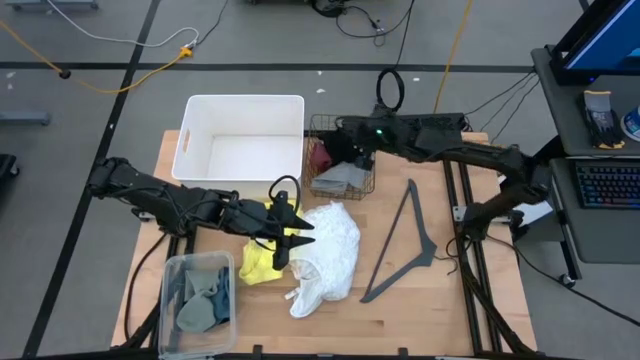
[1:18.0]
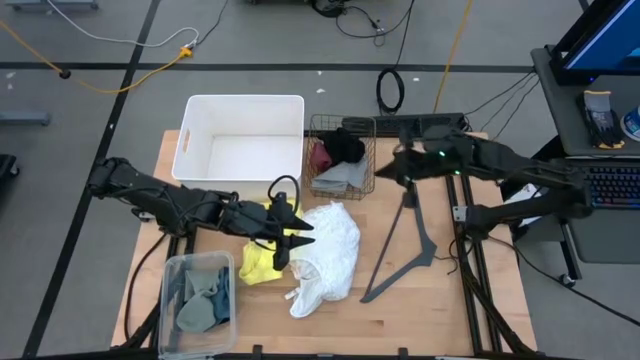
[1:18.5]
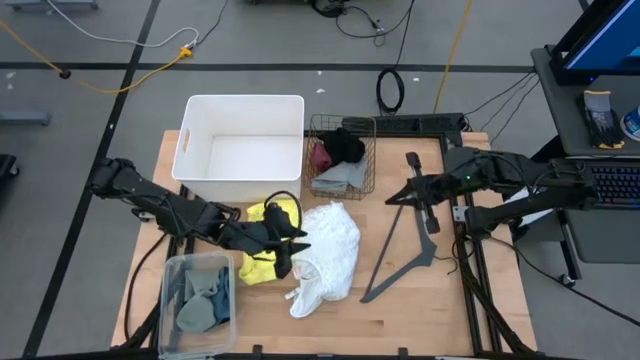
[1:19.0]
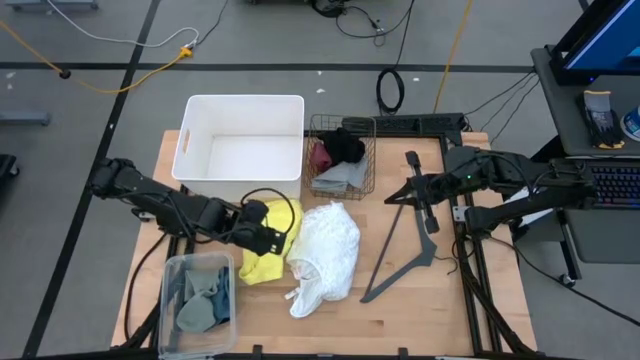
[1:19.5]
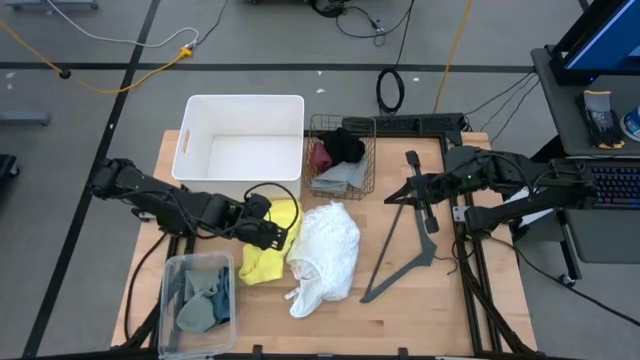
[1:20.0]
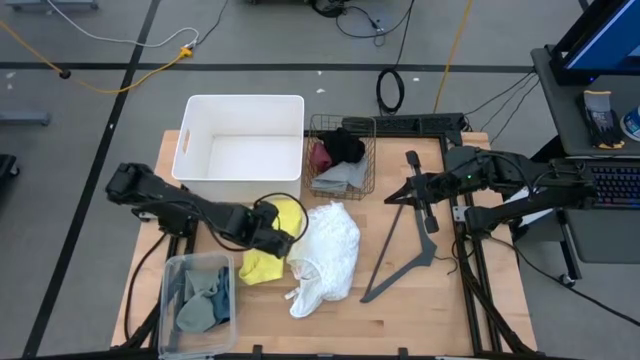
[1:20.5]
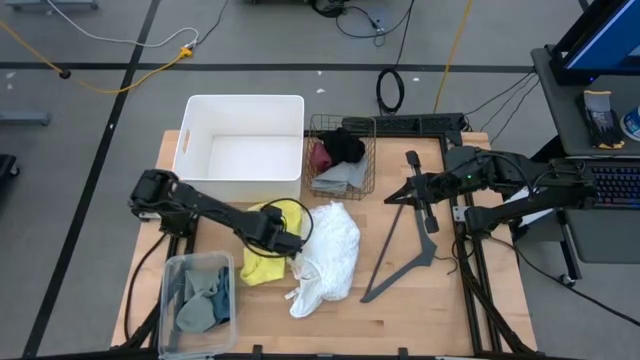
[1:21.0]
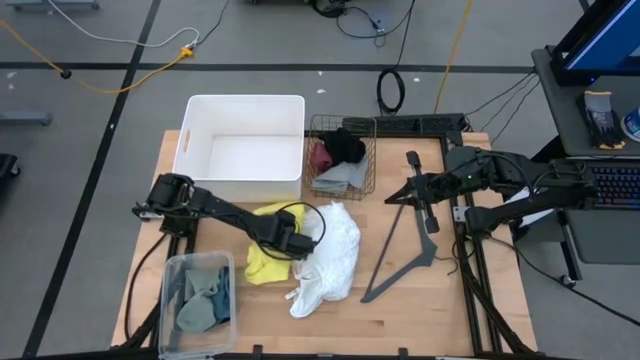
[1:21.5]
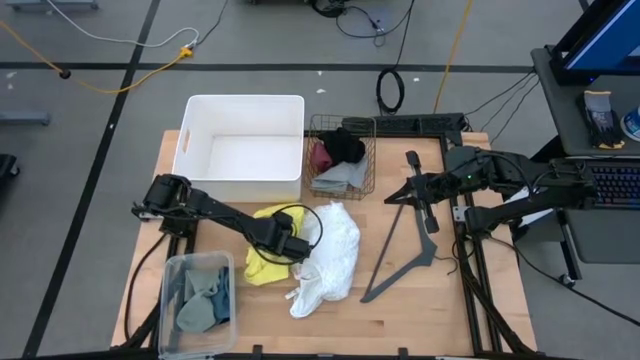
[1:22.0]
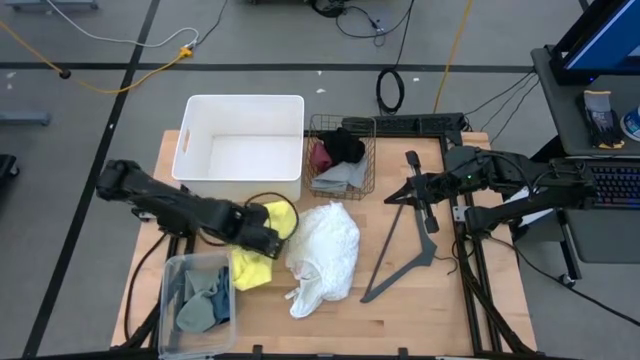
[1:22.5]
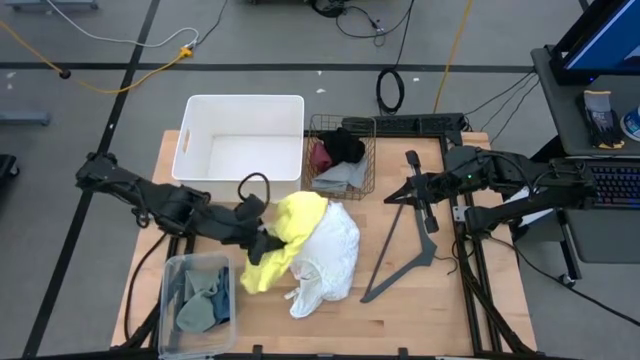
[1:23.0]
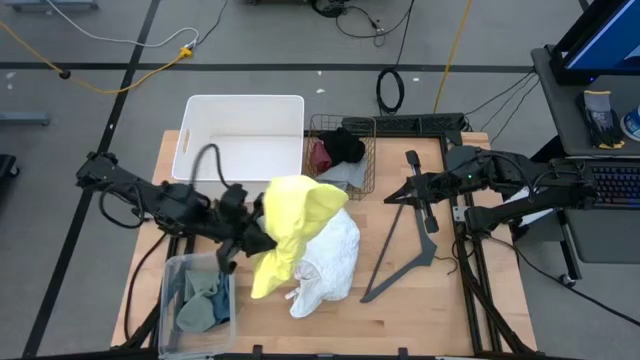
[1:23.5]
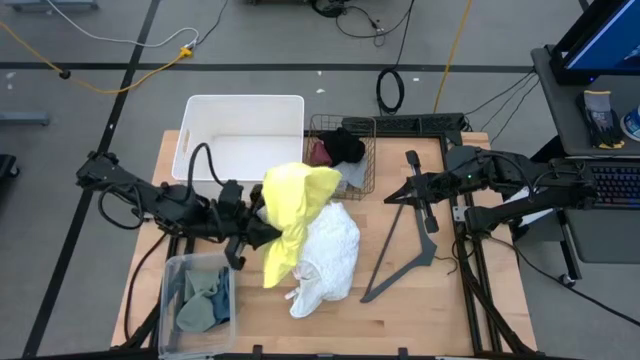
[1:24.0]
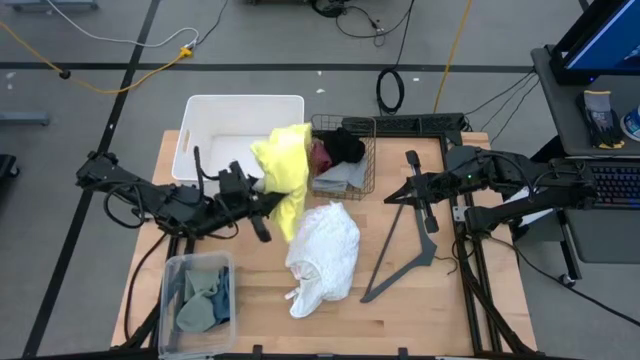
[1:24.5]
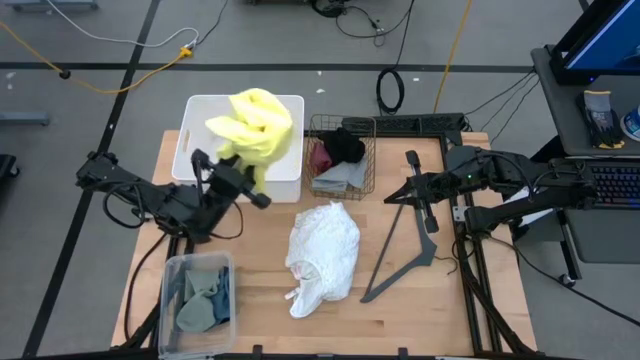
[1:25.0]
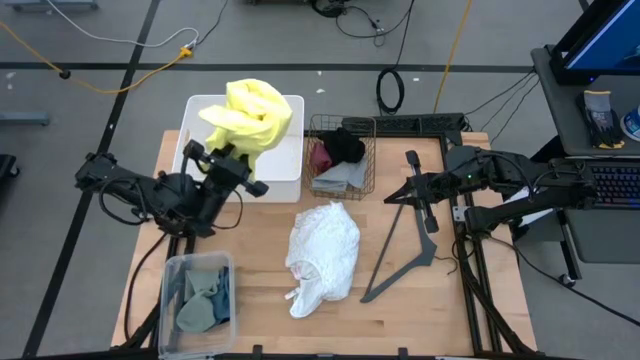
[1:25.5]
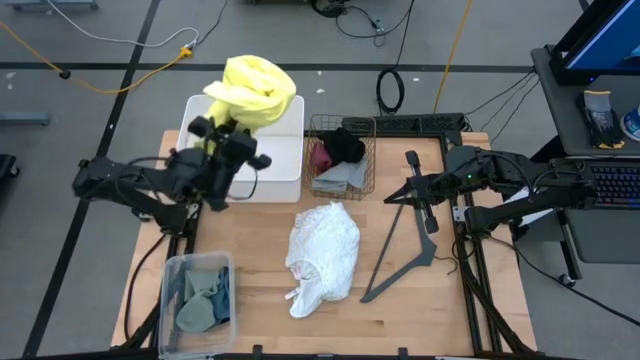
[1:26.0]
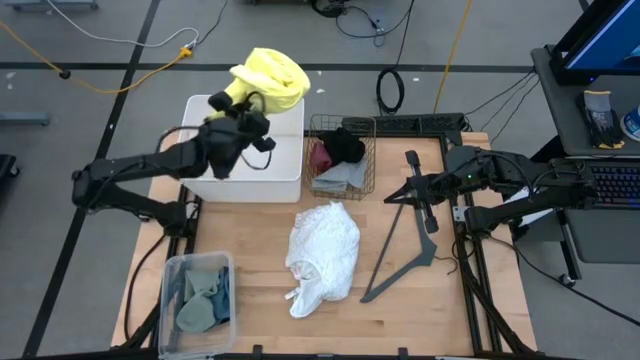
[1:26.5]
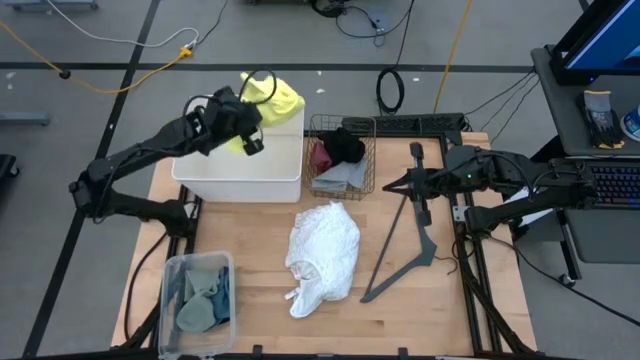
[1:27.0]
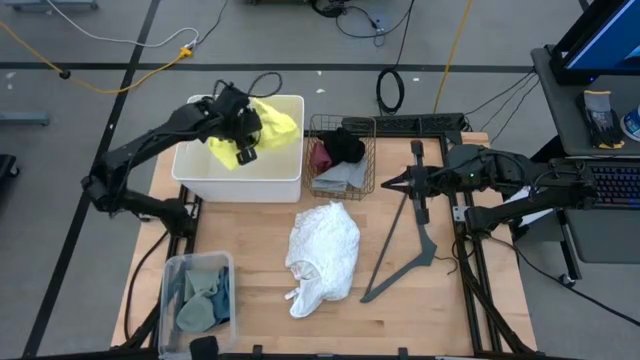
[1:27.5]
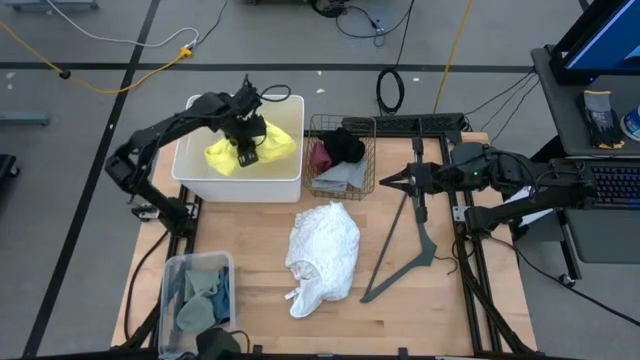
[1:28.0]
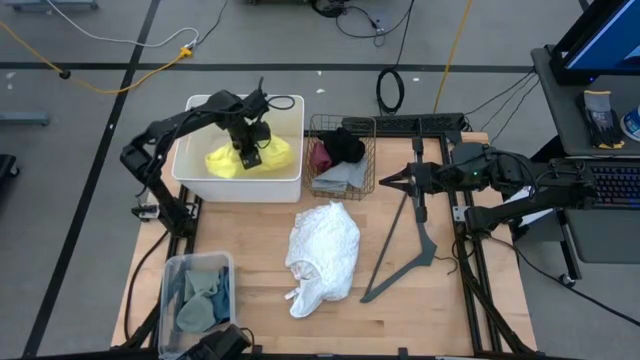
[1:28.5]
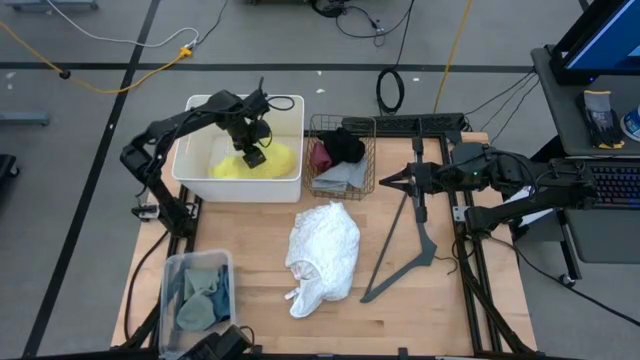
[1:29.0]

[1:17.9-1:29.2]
Task: Pick & Place Cloths
Put the yellow shirt into the white bin

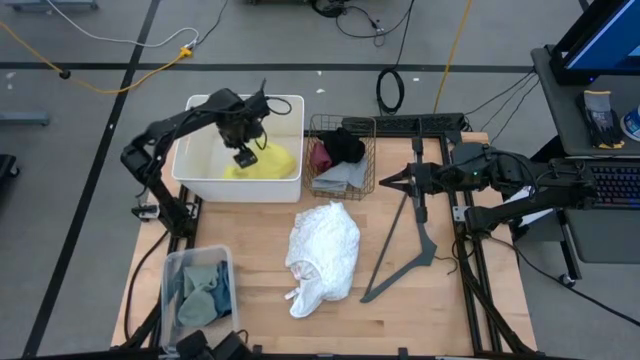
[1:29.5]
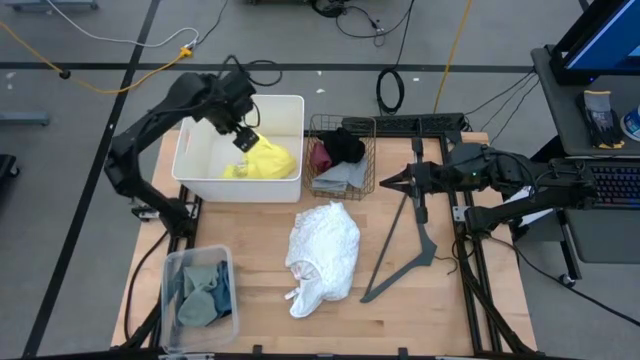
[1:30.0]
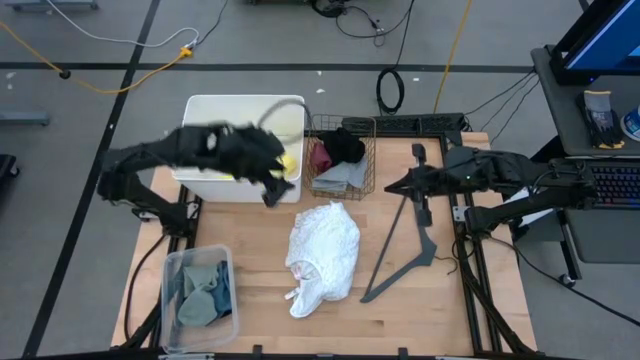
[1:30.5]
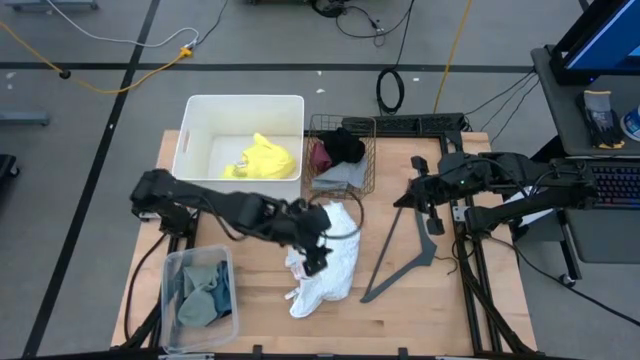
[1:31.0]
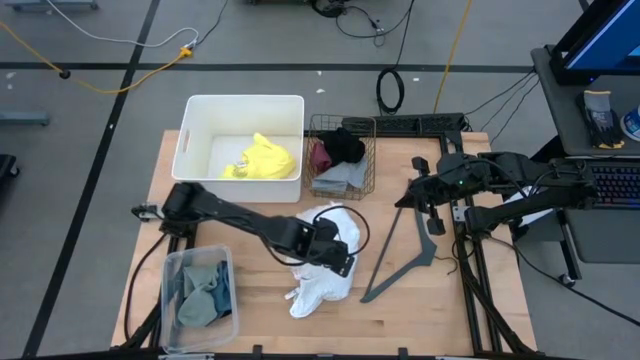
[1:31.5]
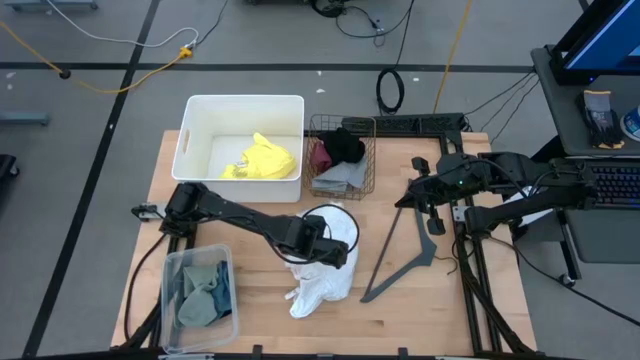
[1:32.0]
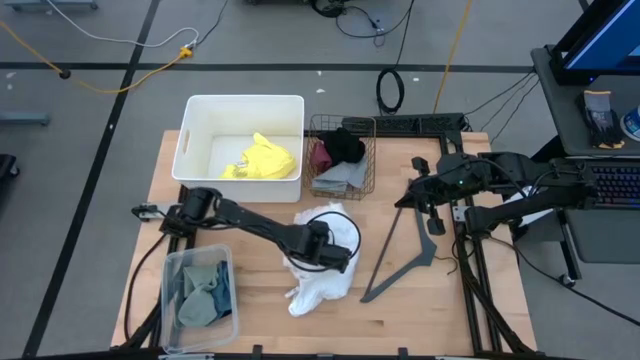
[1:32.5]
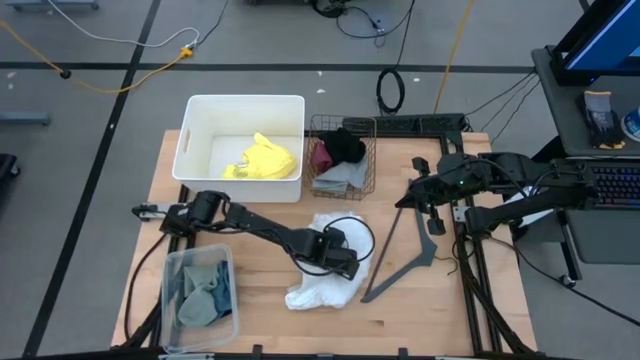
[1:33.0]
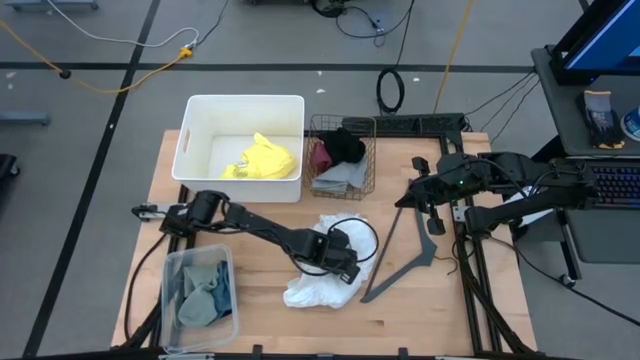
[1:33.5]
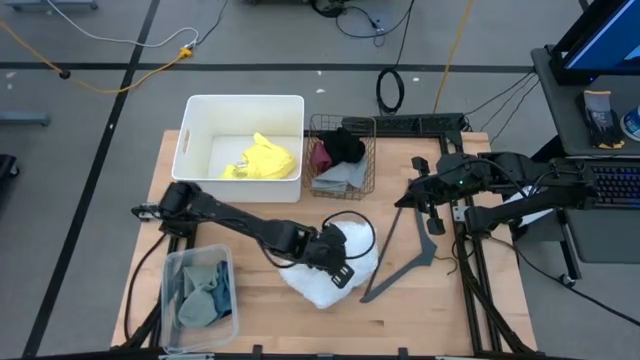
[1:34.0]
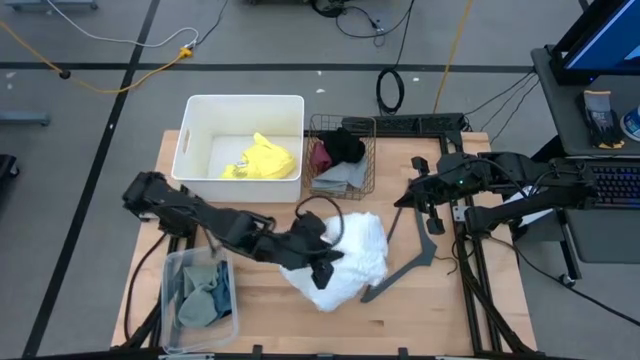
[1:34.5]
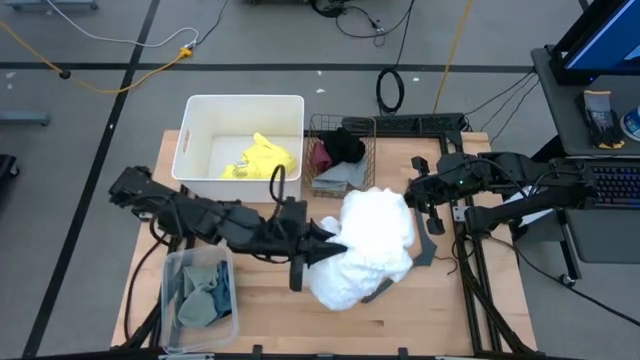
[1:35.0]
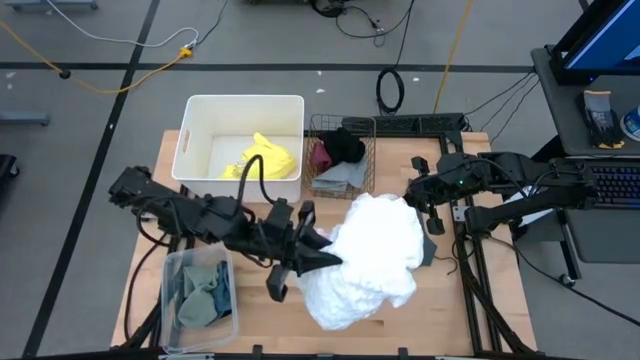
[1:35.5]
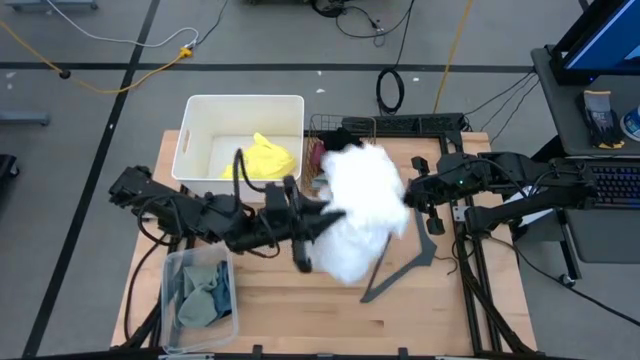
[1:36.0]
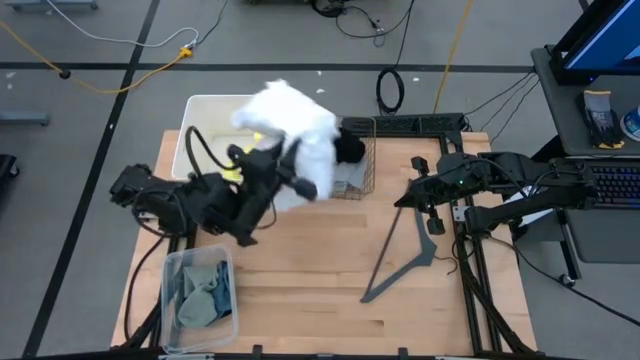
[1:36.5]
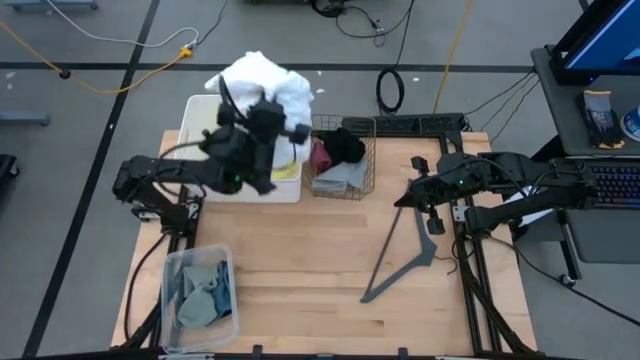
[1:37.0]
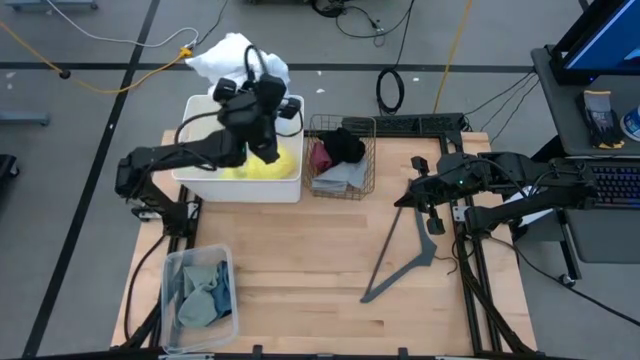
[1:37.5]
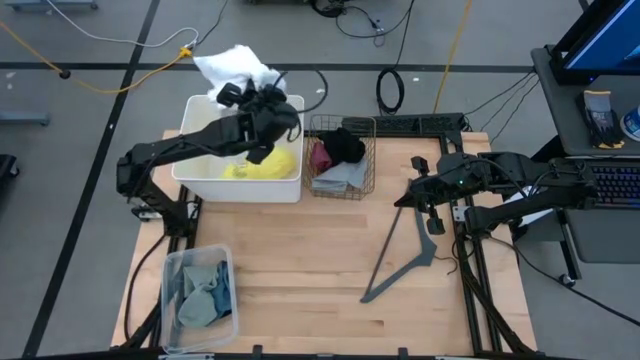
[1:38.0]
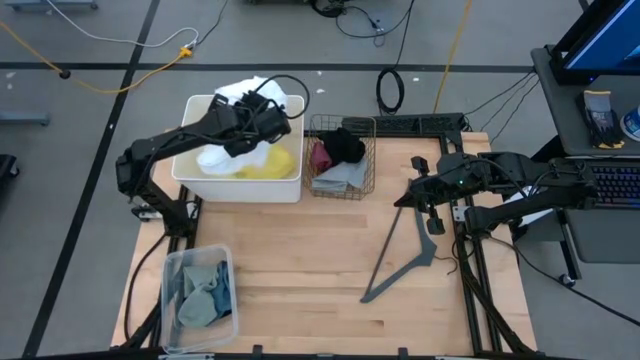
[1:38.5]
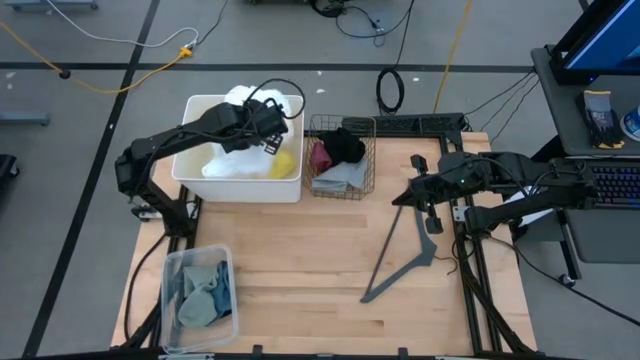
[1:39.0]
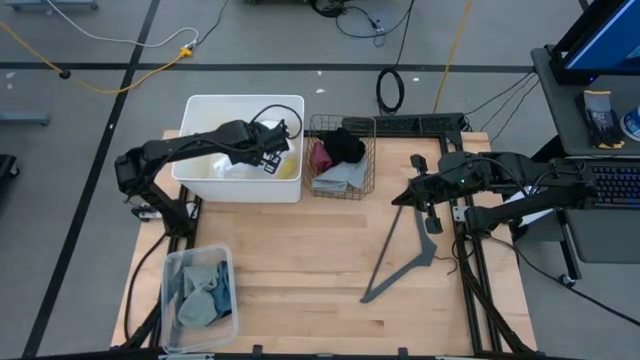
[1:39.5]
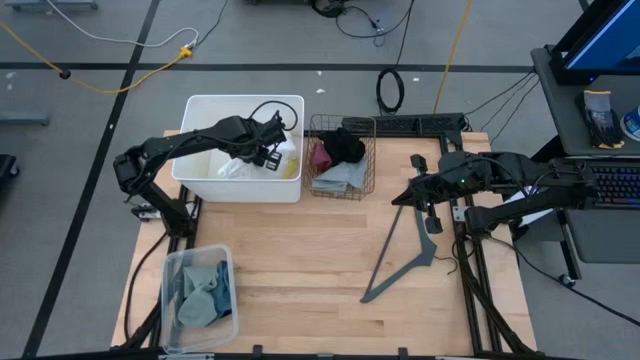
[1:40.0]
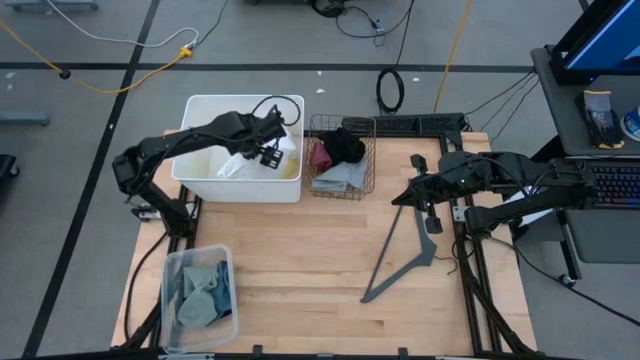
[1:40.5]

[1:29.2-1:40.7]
Put the white cloth into the white bin
